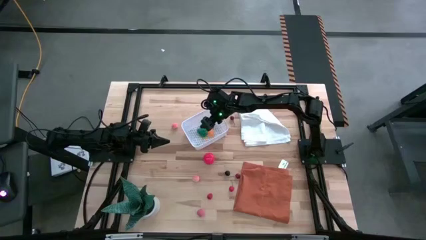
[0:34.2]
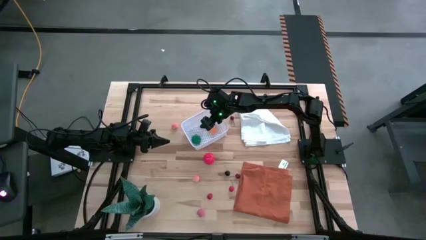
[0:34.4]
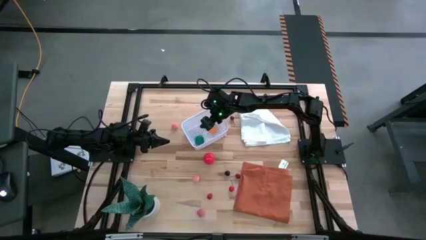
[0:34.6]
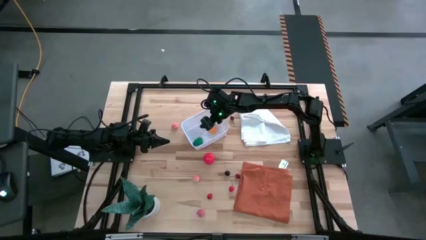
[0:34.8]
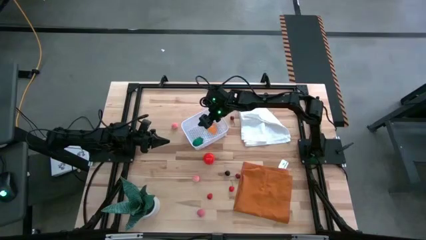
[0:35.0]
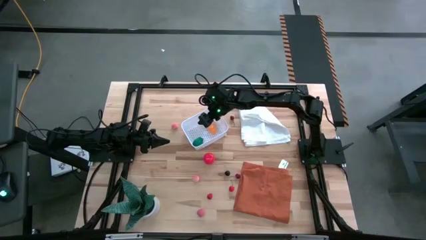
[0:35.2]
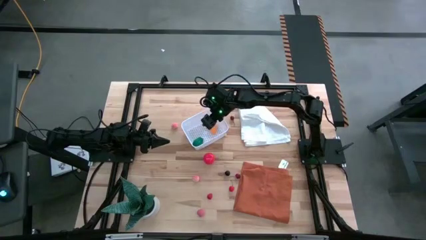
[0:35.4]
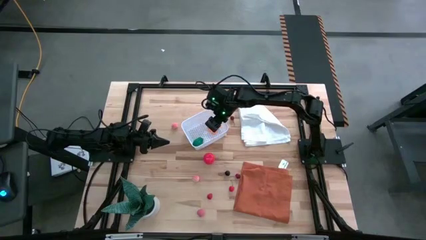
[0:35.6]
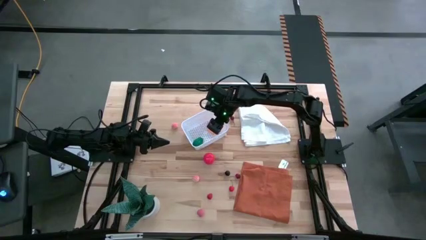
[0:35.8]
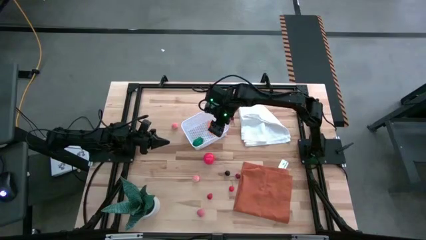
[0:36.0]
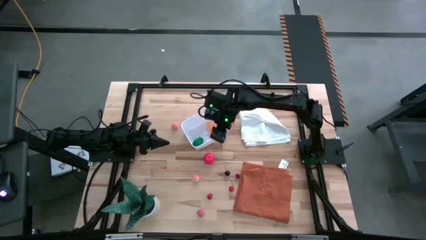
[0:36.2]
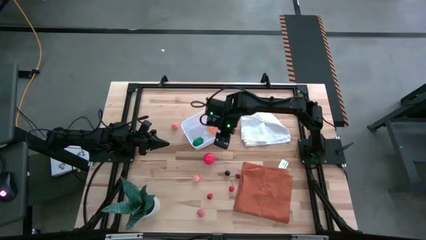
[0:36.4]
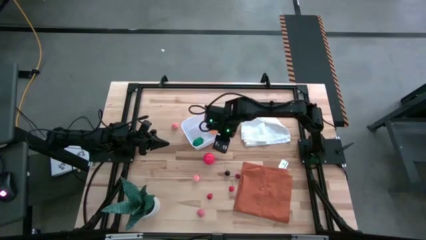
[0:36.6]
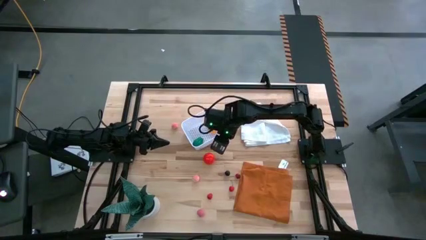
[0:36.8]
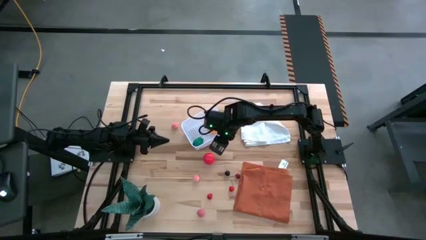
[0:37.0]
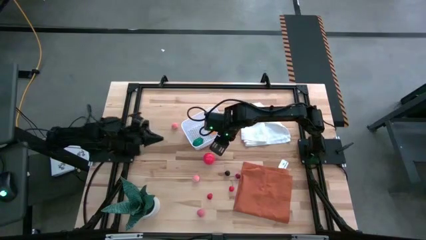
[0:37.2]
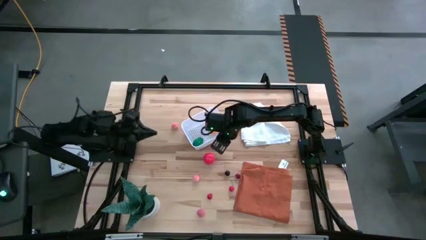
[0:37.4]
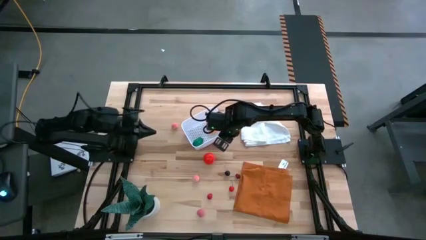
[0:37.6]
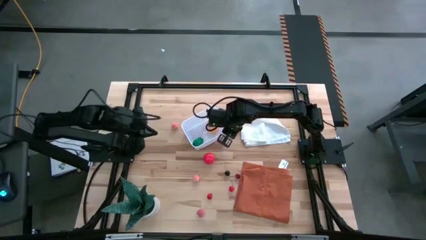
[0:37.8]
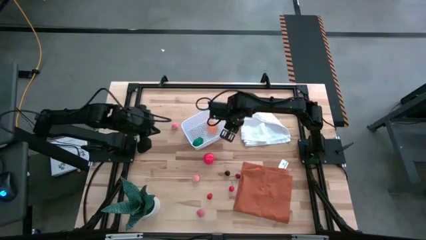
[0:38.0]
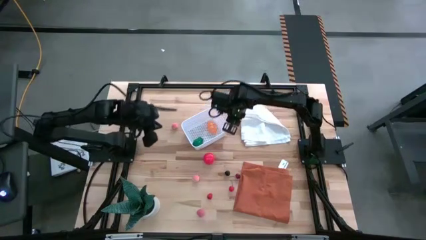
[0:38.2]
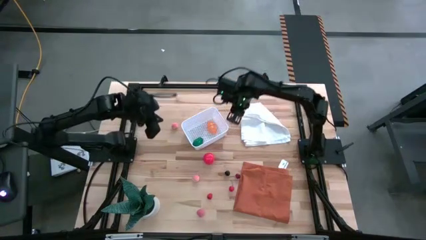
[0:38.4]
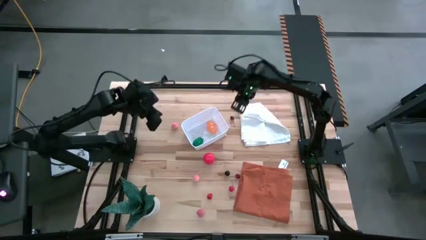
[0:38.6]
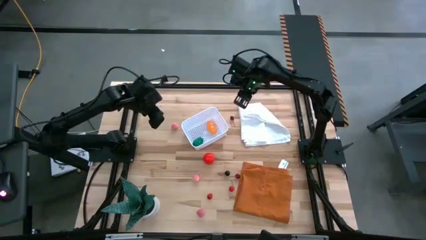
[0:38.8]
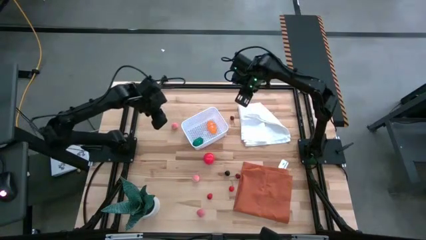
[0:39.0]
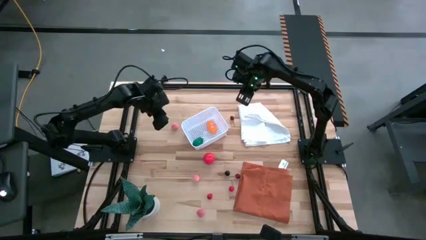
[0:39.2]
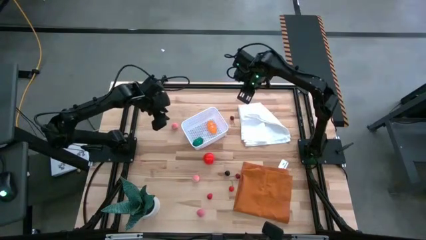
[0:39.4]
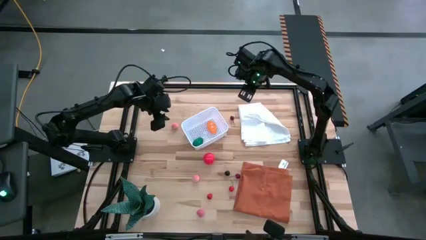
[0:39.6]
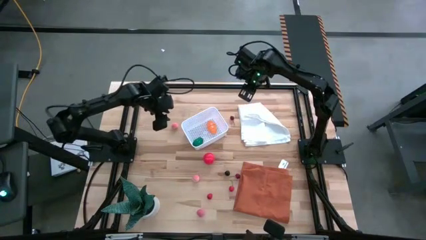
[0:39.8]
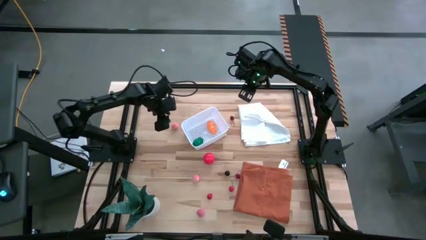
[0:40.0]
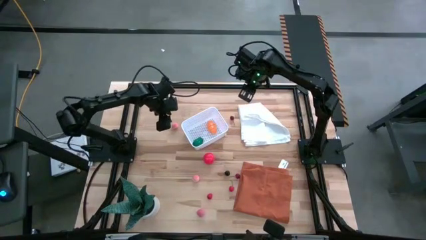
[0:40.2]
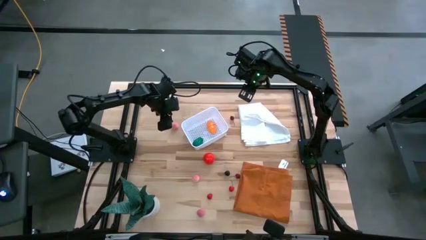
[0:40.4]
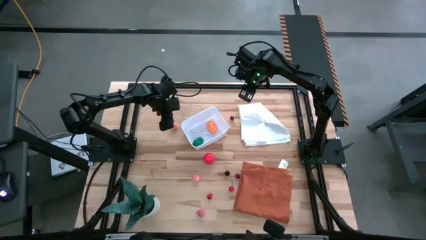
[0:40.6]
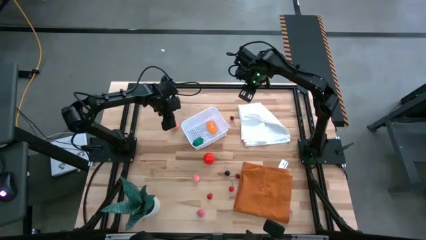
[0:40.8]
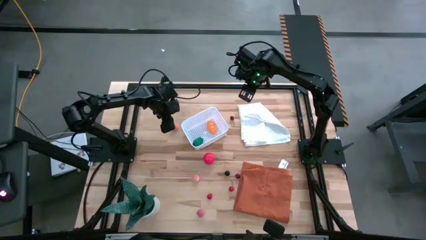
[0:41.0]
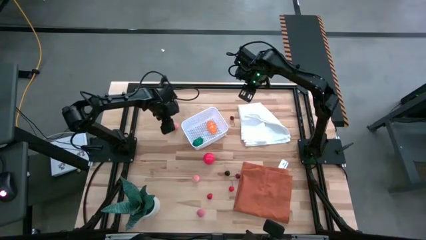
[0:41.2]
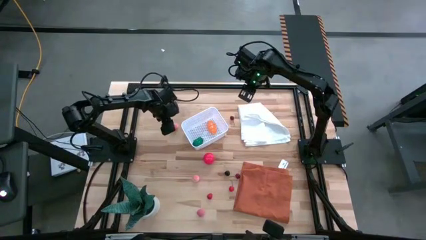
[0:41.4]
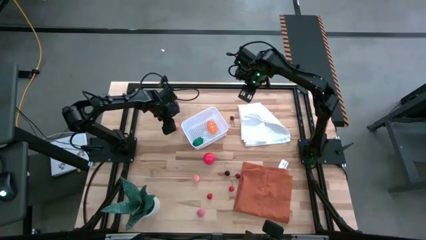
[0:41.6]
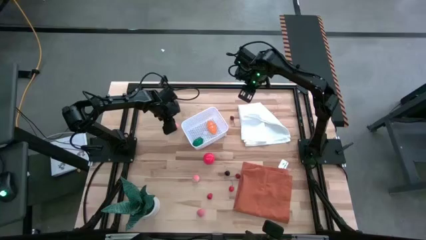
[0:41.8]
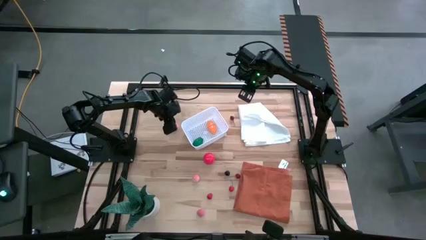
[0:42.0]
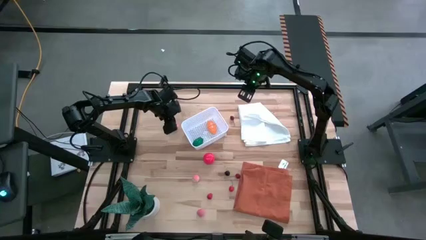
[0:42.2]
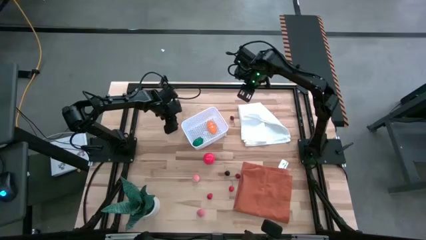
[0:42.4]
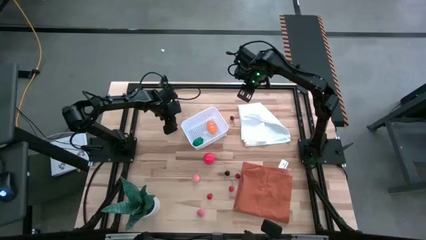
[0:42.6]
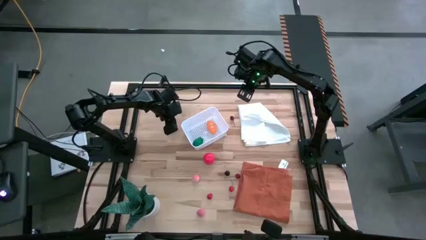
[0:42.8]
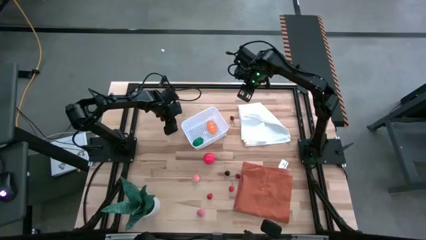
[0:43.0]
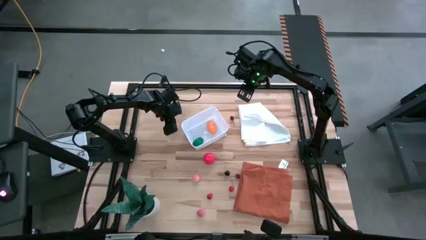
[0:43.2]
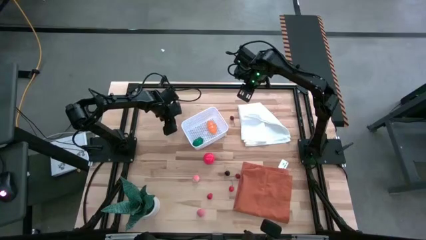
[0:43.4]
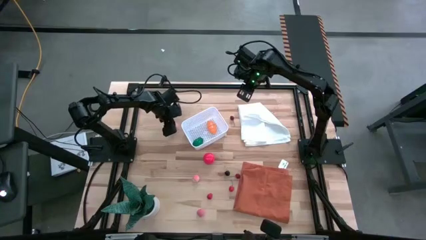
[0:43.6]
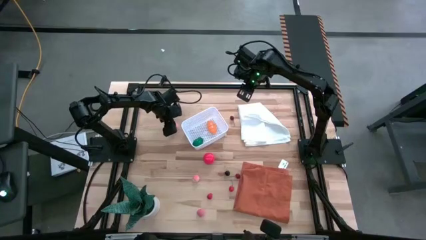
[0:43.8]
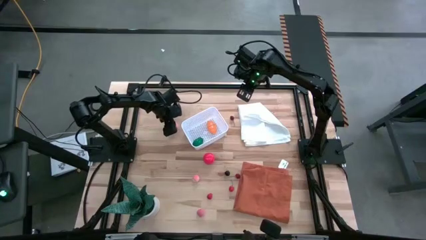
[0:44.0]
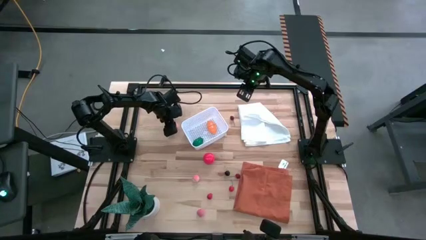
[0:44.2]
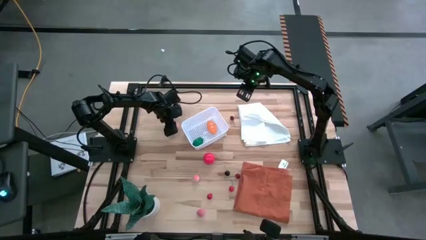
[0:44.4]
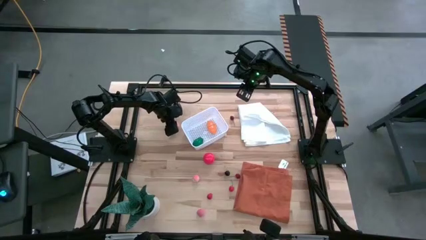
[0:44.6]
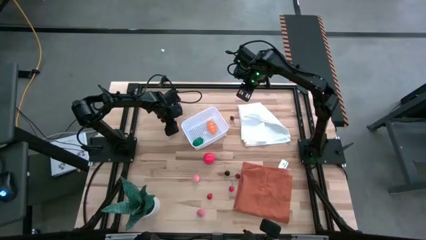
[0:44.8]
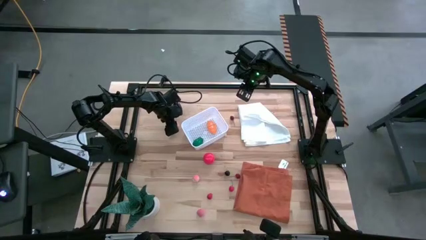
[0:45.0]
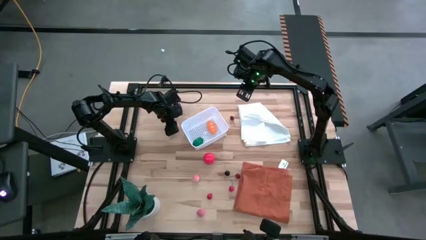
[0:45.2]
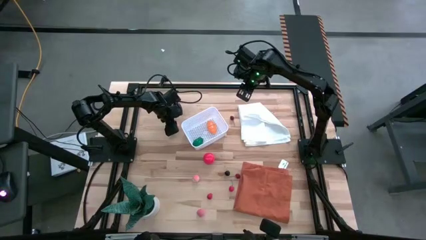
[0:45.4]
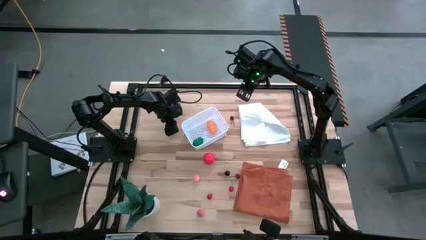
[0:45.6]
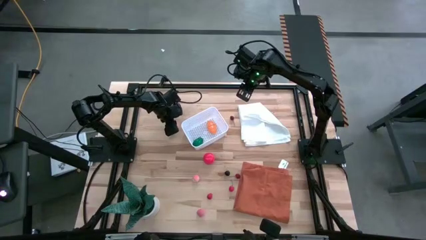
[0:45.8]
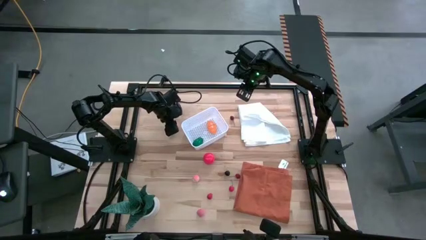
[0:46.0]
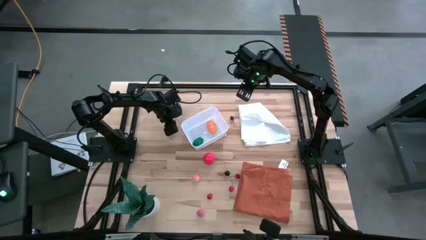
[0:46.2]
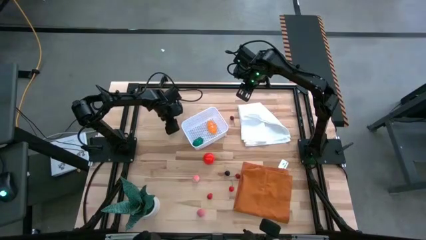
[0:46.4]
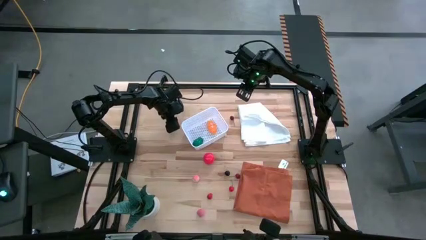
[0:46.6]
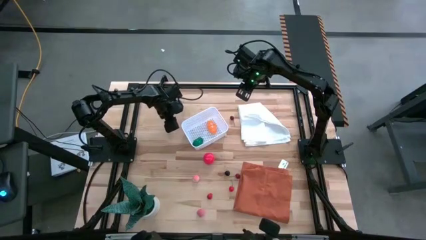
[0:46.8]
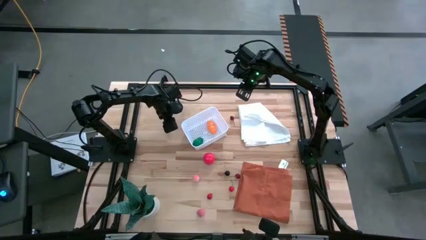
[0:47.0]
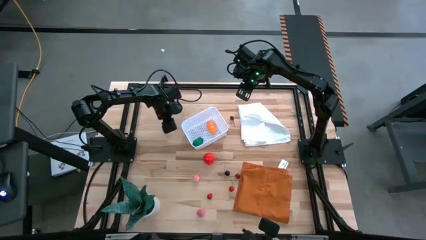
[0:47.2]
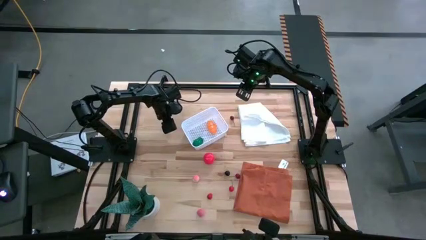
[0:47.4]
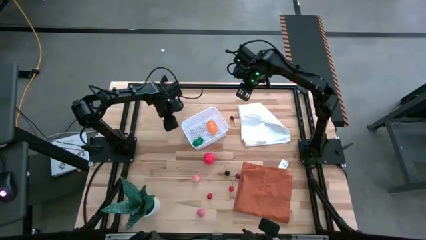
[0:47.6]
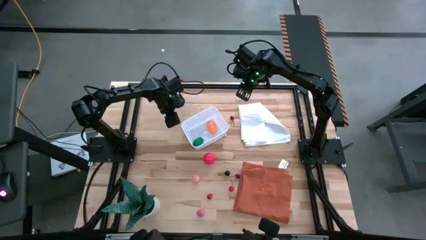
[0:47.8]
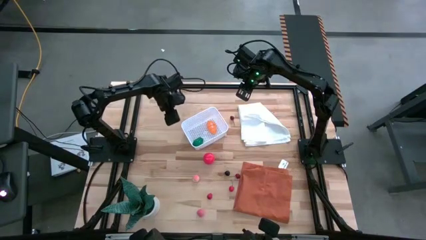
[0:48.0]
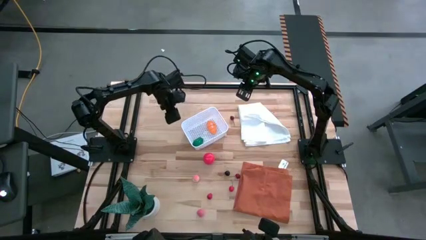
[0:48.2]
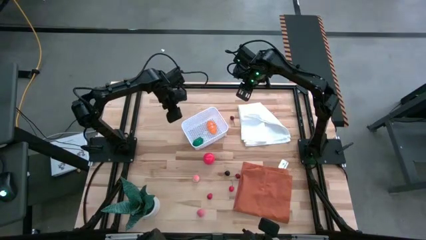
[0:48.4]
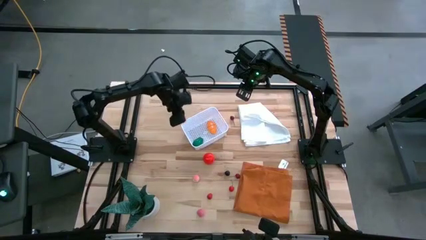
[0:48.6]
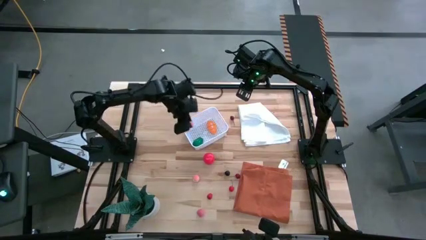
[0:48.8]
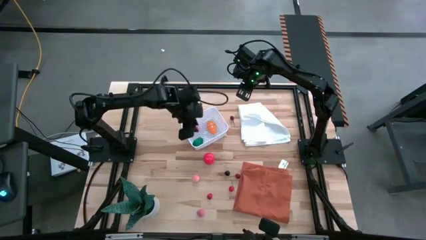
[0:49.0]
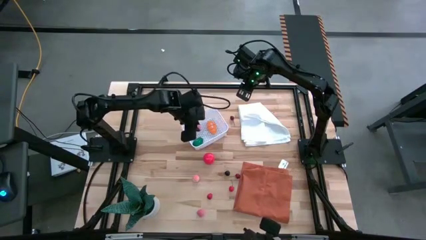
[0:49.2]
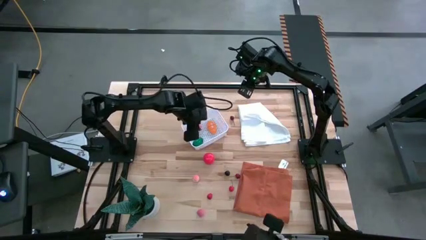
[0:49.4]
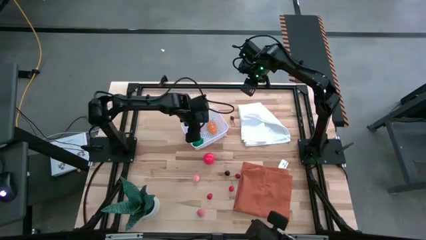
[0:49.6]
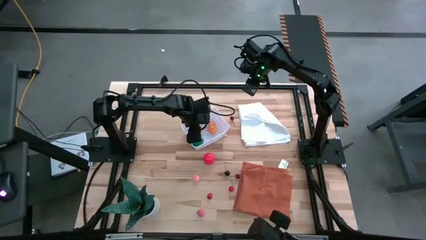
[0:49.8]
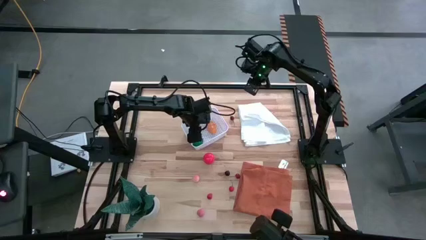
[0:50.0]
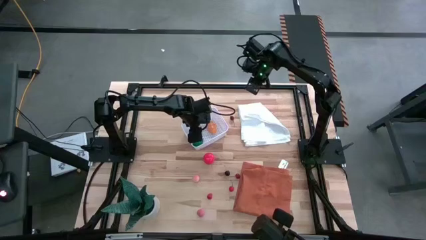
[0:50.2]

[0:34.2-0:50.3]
Task: Pick and placing Produce into tupperware
Put the top apricot in the basket

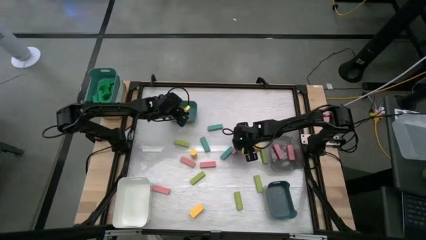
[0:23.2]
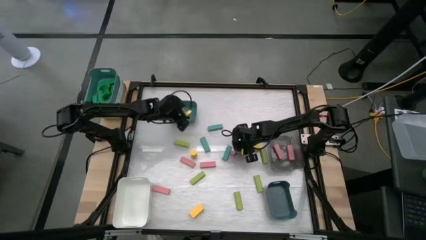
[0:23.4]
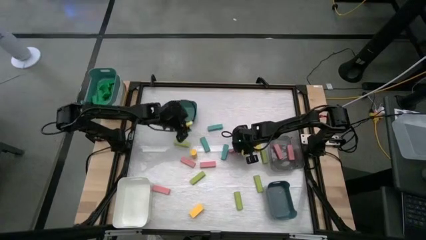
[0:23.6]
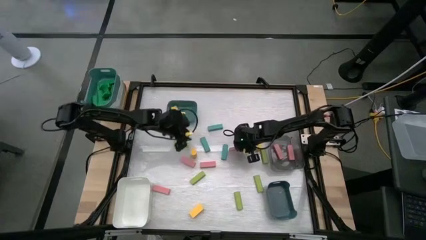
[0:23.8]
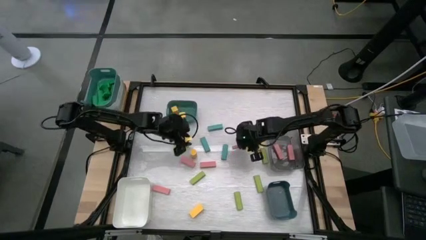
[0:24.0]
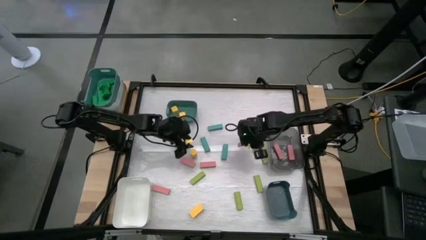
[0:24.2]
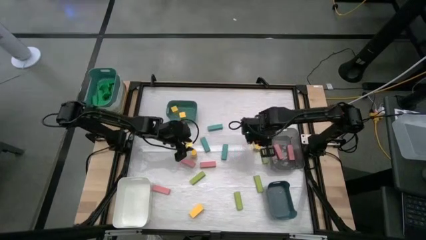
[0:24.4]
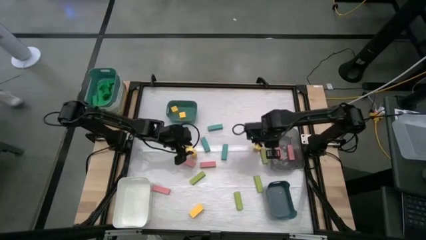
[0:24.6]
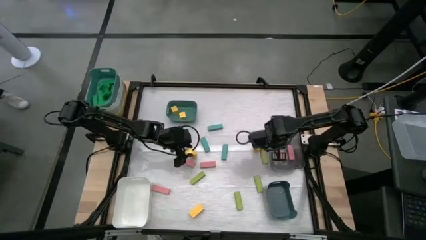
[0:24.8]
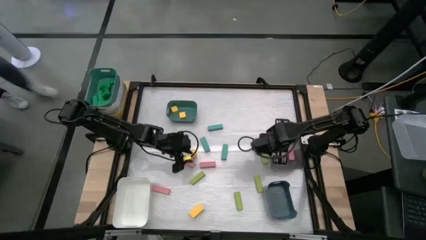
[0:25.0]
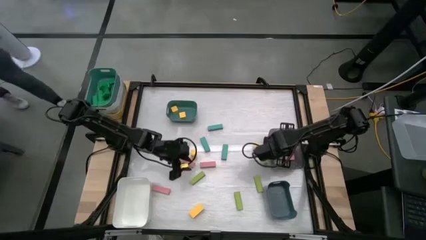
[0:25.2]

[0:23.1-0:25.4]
Task: Sort blocks
Put the pink block into the black bin
